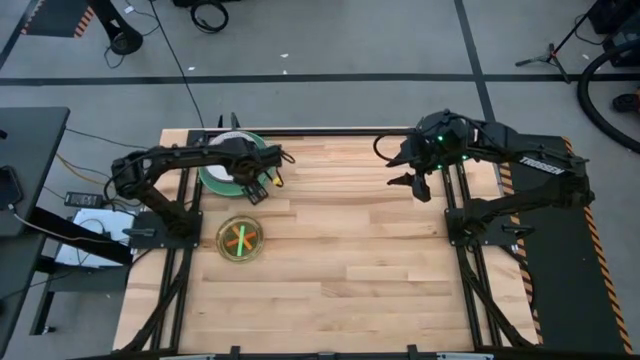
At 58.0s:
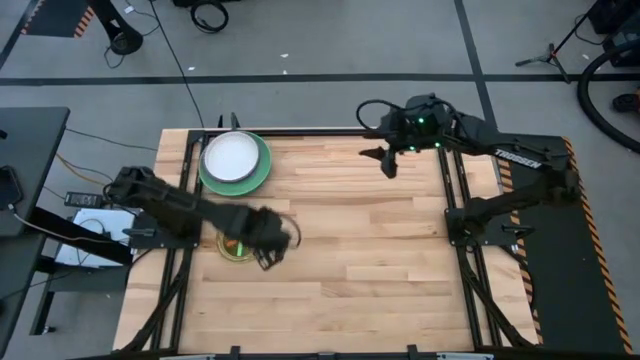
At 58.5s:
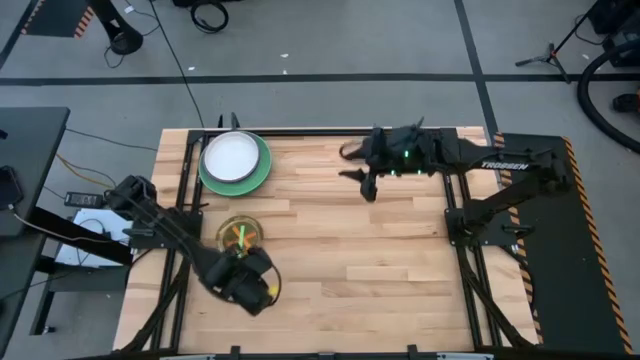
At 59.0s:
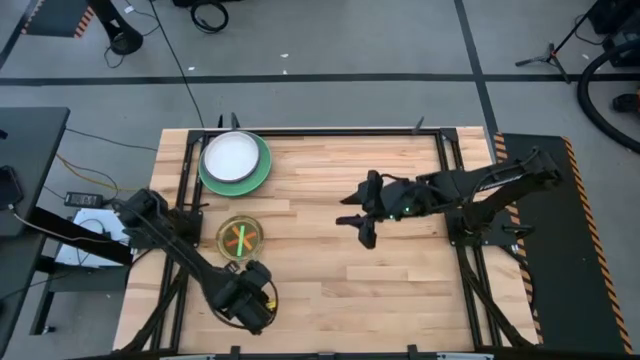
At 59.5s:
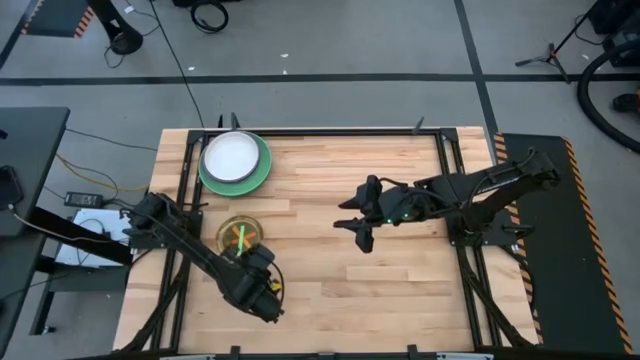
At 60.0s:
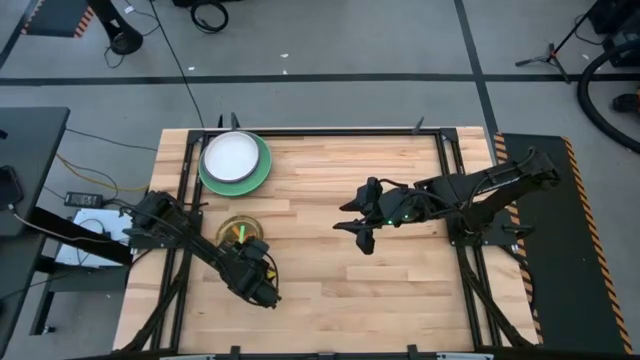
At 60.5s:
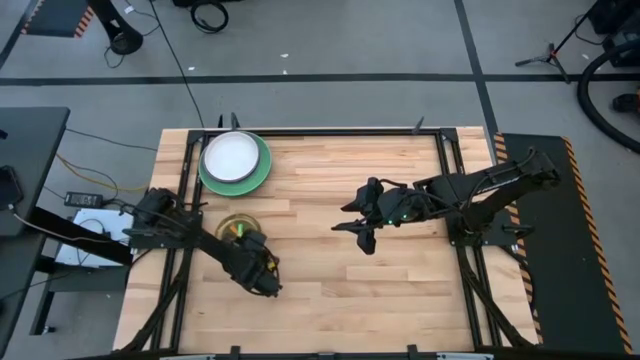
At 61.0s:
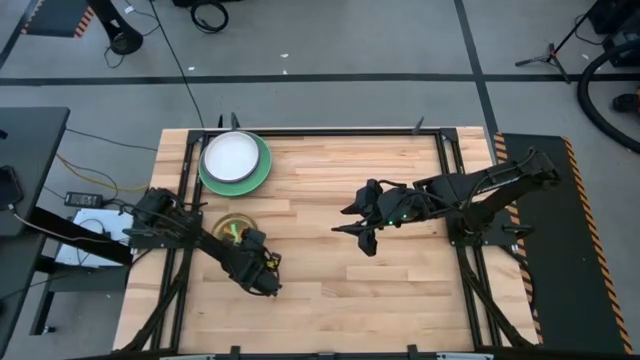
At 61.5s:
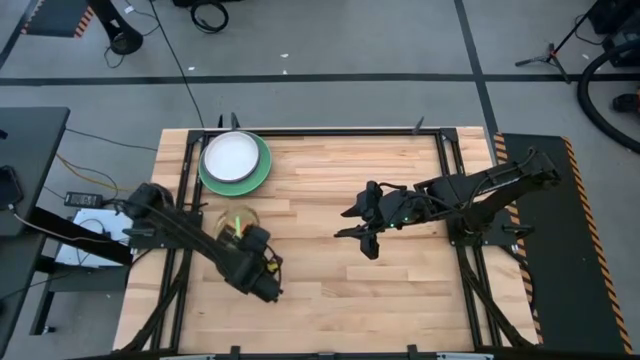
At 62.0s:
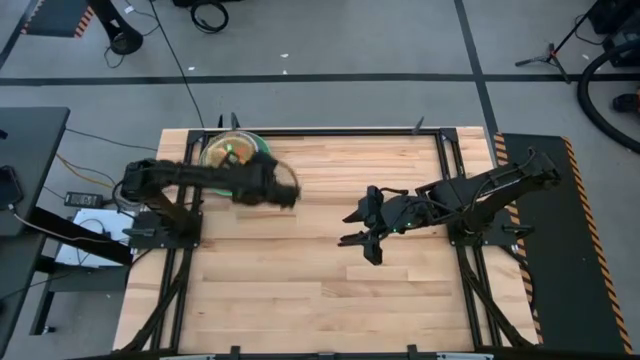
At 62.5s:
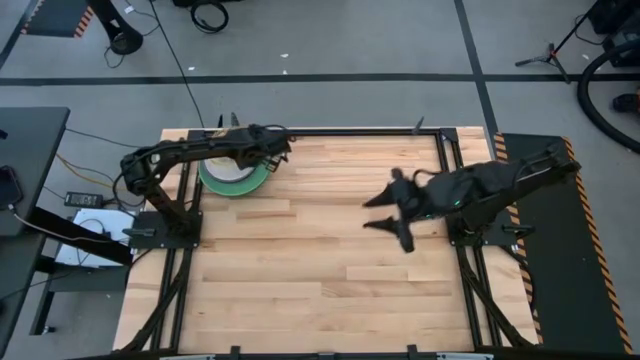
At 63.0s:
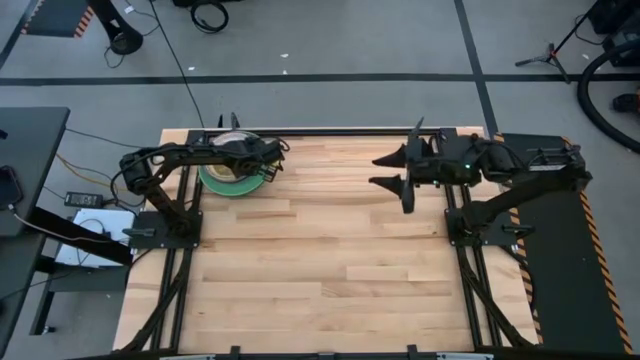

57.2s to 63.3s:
Task: Stack plastic plates
Stack the bottom stacked plates on top of the white plate

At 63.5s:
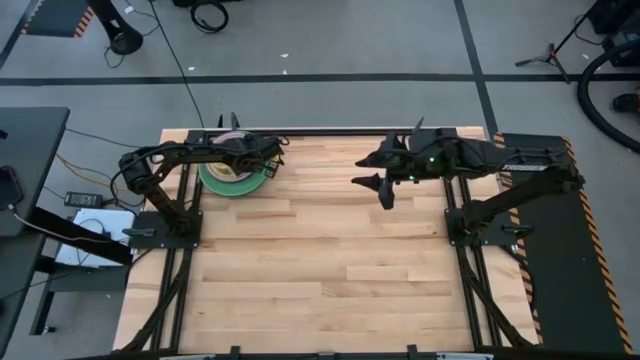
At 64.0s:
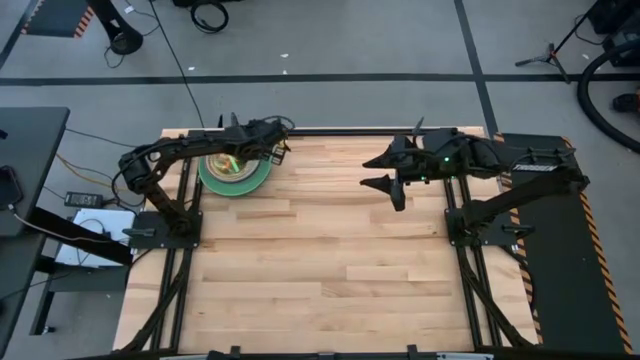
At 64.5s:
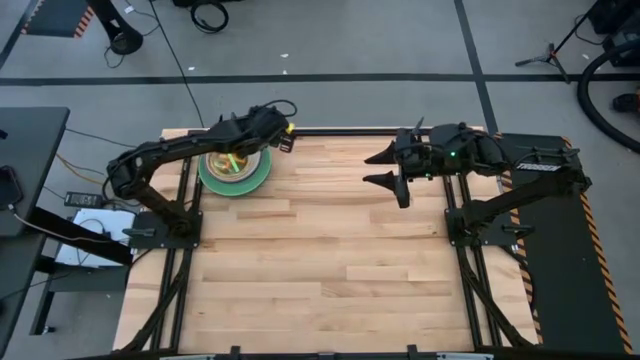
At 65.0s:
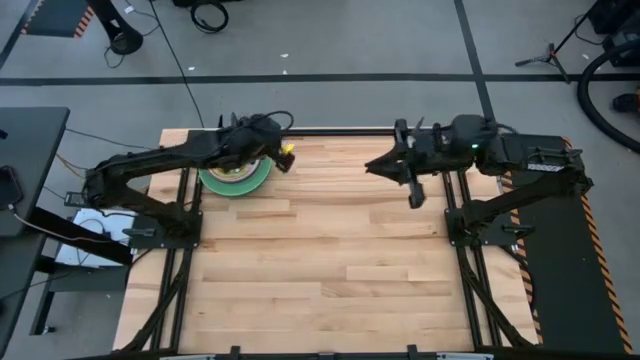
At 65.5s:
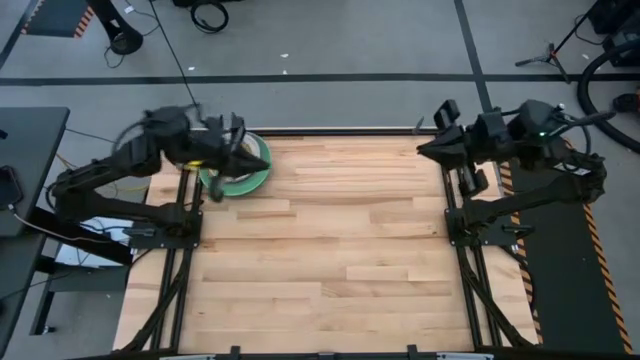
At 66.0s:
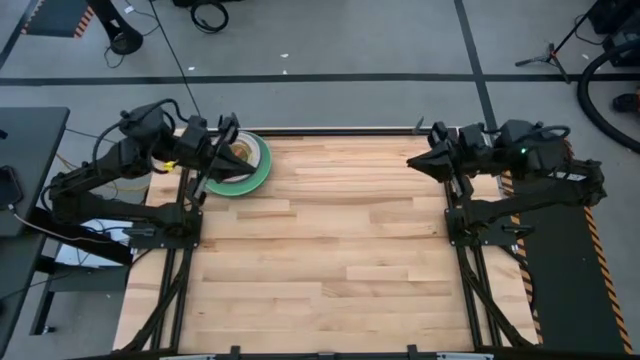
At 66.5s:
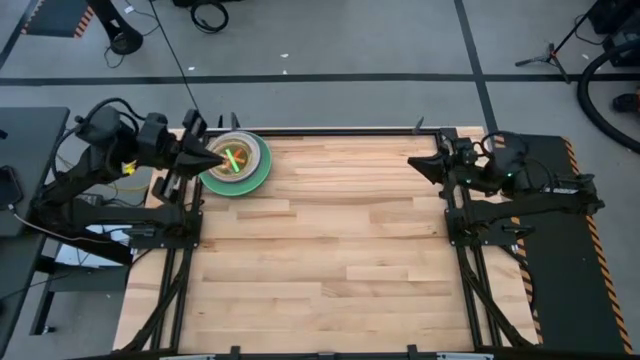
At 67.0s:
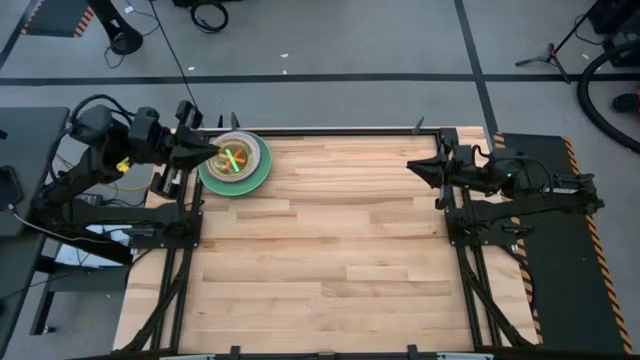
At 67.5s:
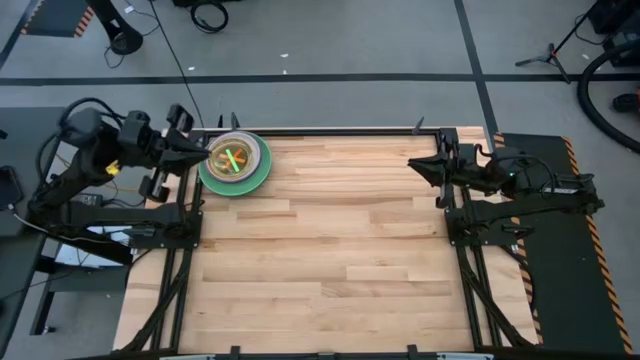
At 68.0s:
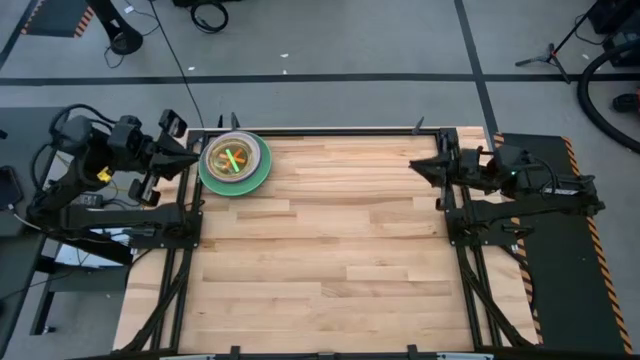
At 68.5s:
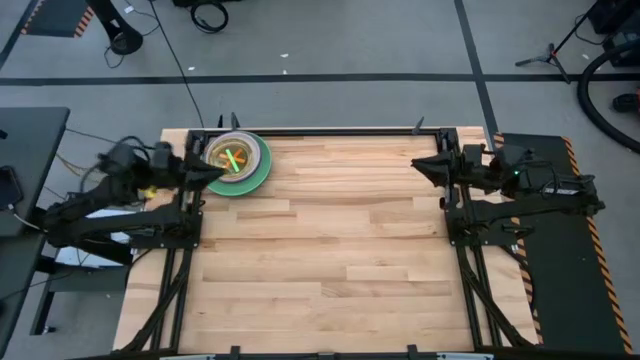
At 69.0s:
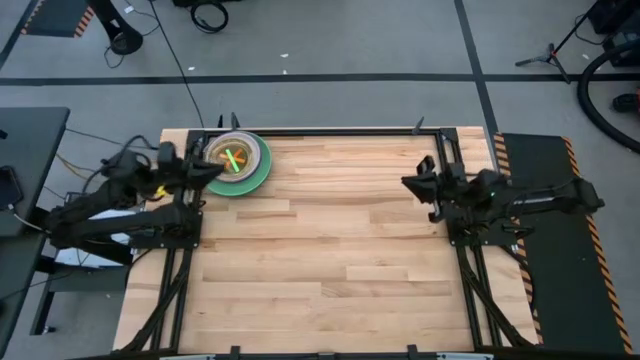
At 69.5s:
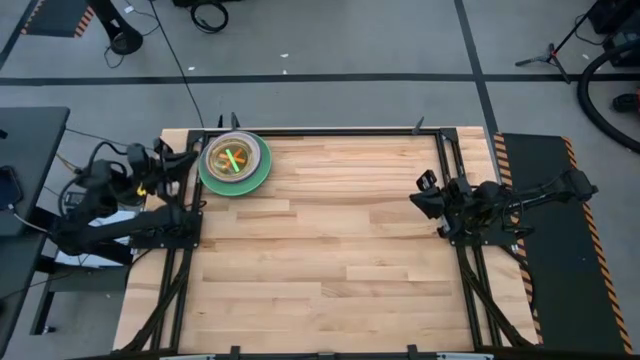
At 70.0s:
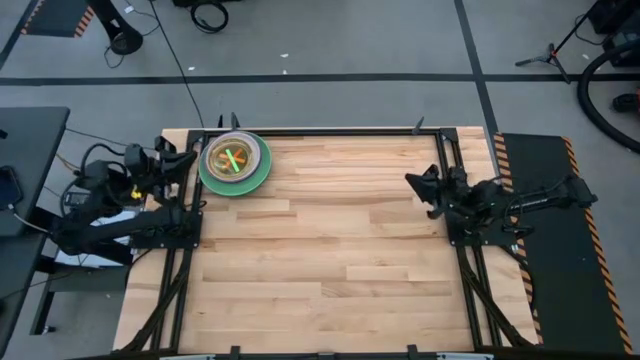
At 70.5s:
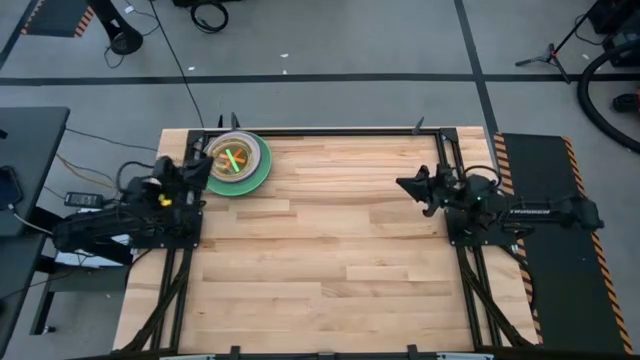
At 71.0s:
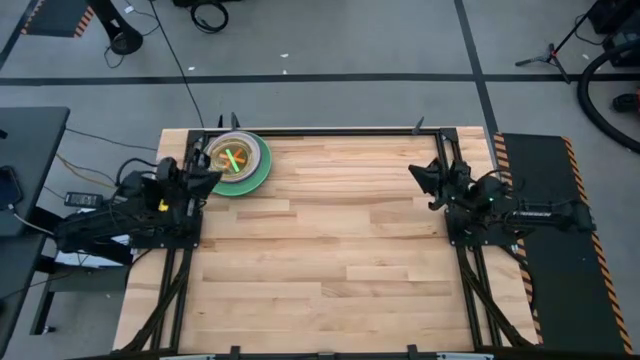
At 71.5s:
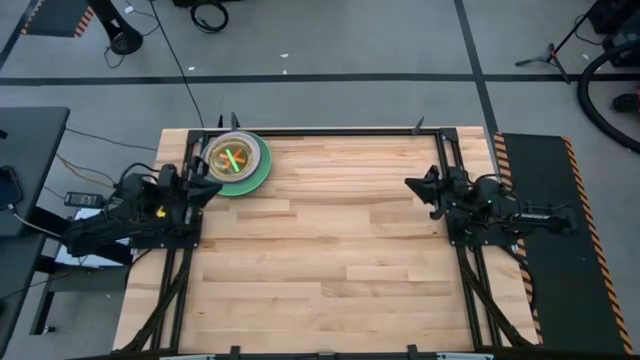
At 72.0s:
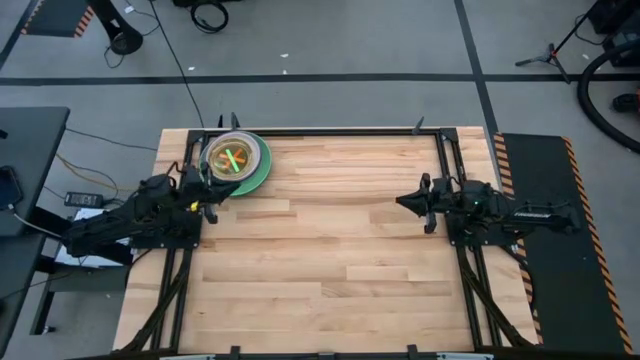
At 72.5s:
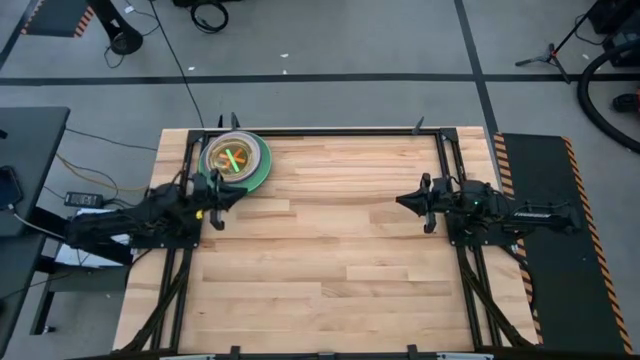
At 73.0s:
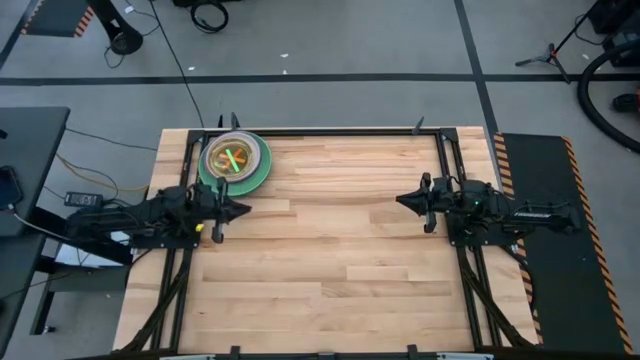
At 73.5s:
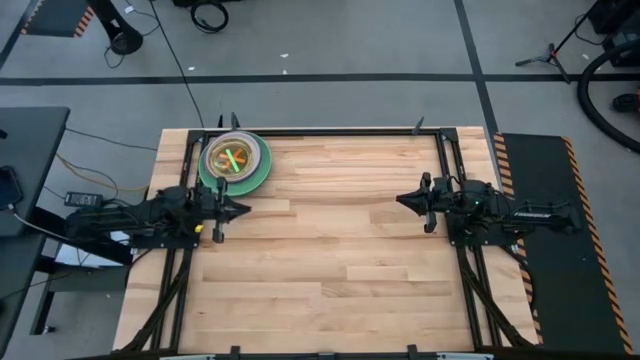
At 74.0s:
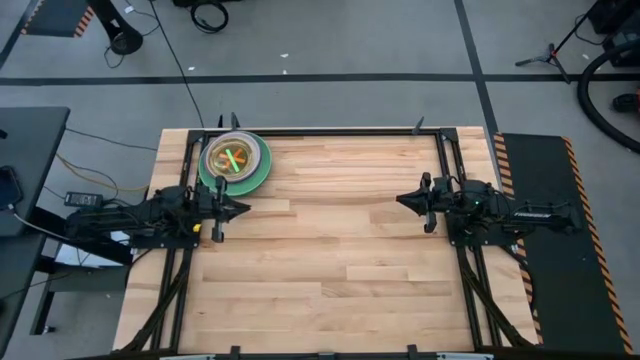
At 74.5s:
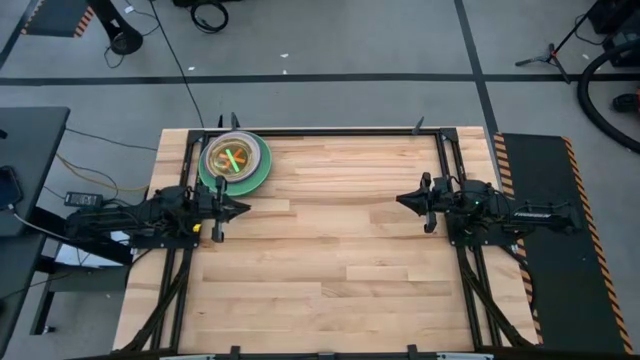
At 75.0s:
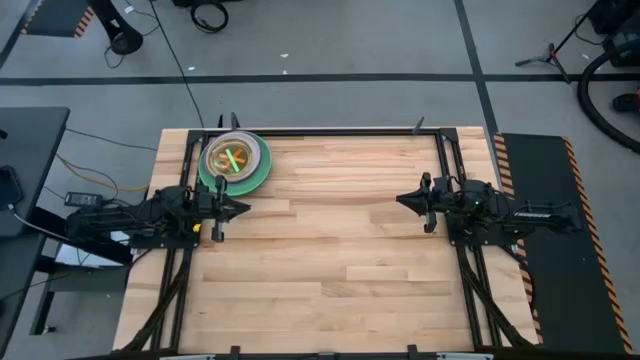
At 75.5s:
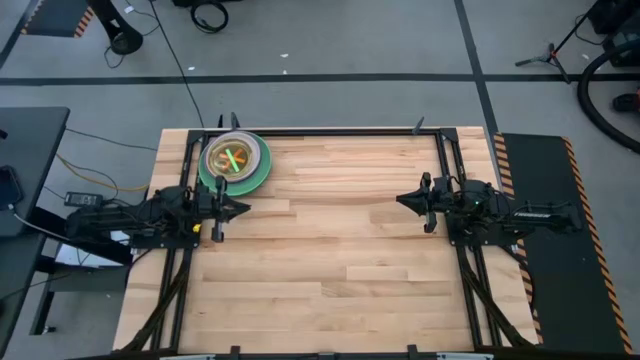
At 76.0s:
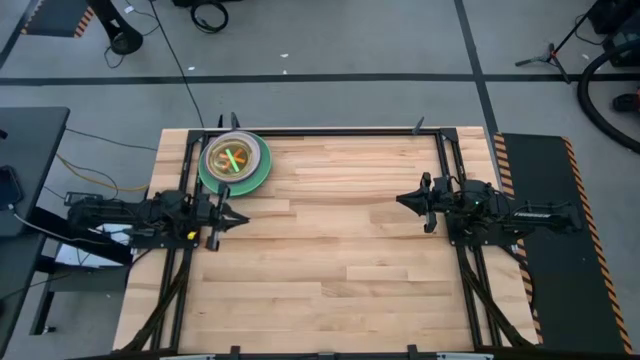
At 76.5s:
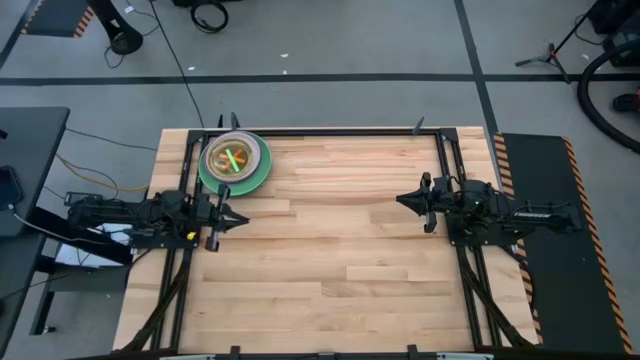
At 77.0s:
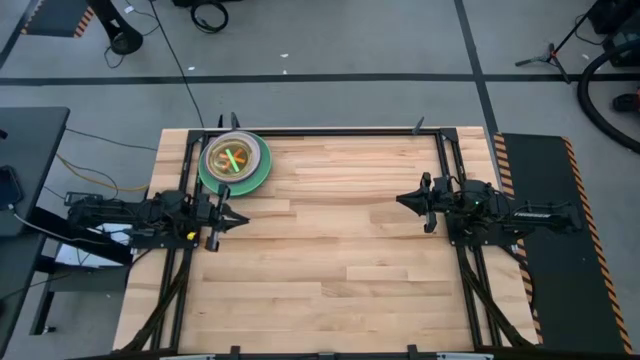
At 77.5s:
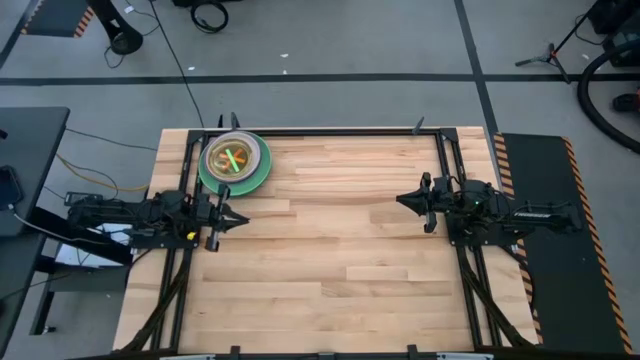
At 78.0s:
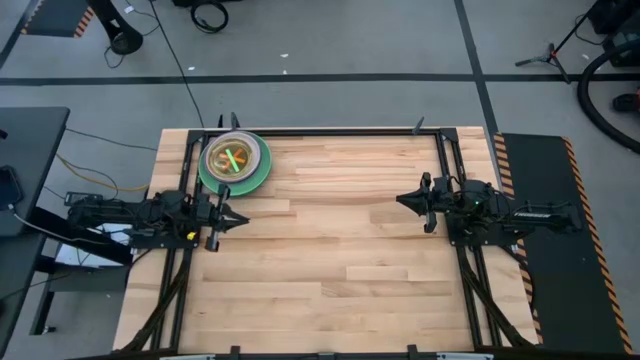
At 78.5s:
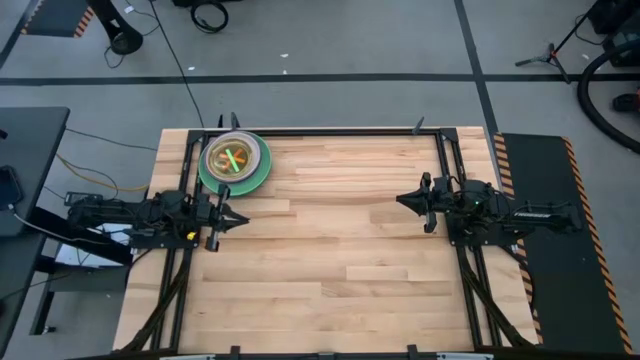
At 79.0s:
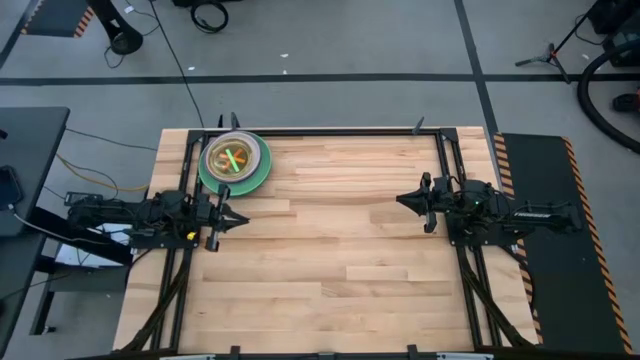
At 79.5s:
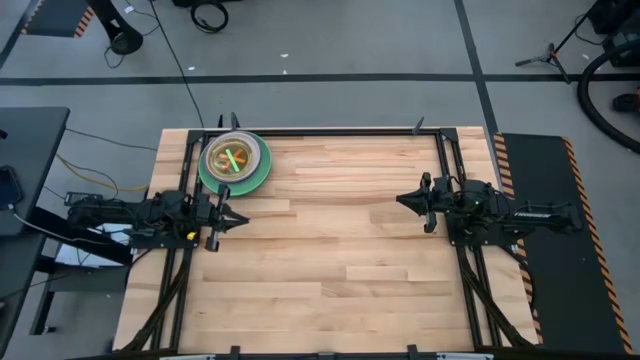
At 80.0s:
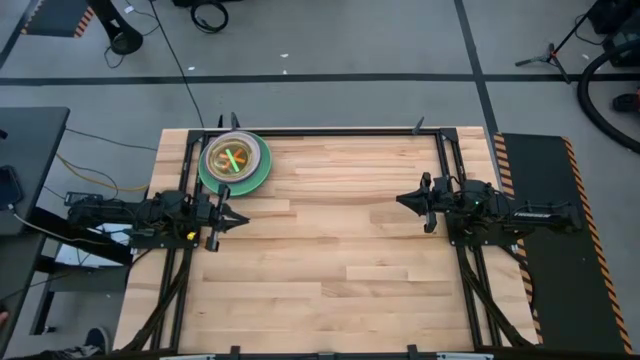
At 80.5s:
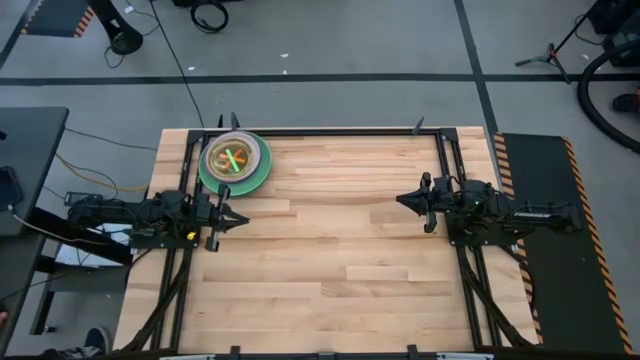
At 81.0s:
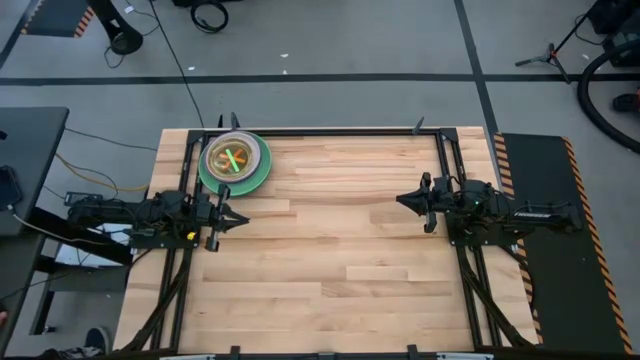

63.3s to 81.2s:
Return to Home Position
